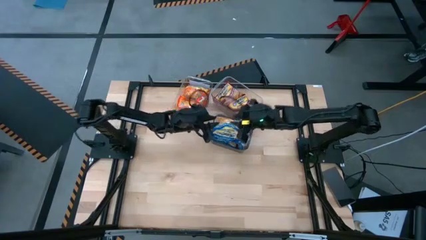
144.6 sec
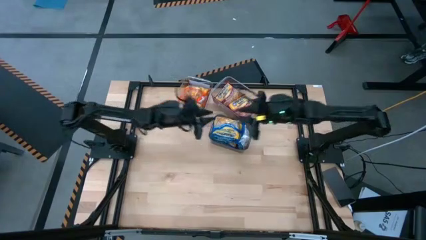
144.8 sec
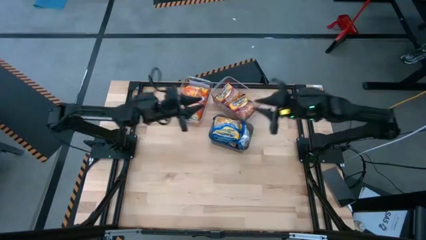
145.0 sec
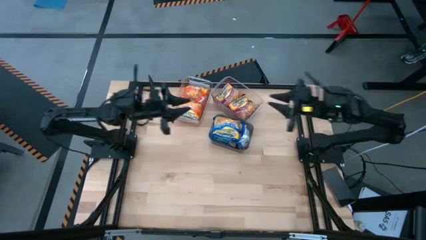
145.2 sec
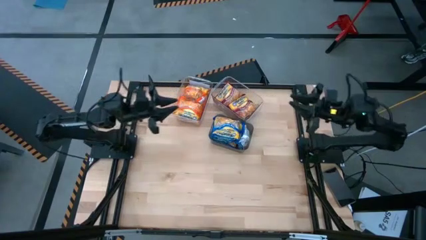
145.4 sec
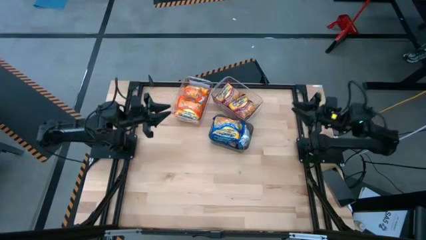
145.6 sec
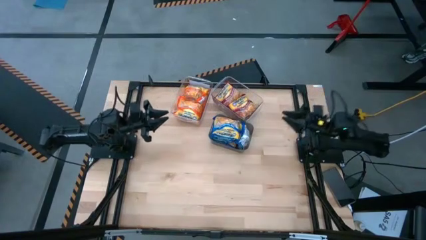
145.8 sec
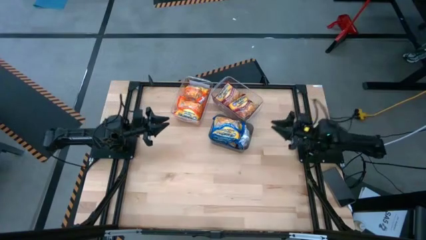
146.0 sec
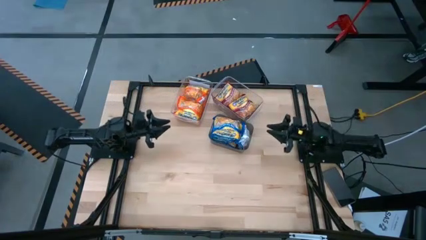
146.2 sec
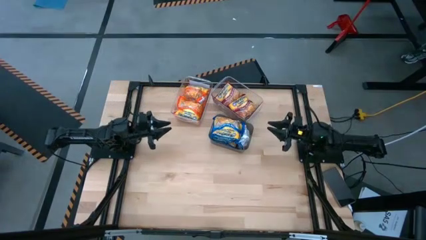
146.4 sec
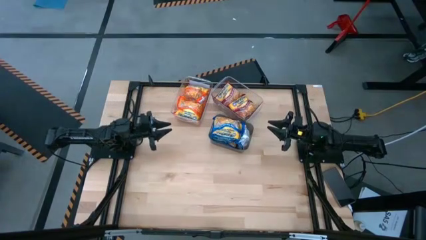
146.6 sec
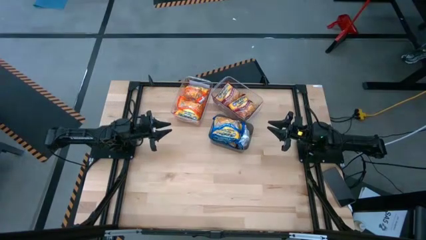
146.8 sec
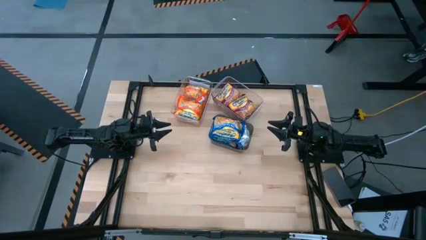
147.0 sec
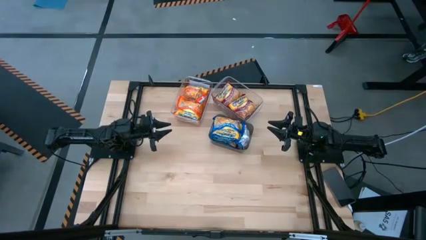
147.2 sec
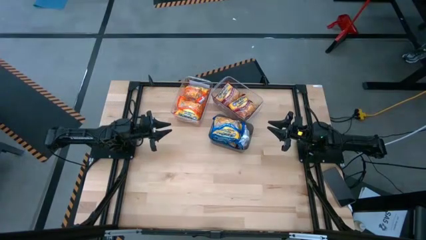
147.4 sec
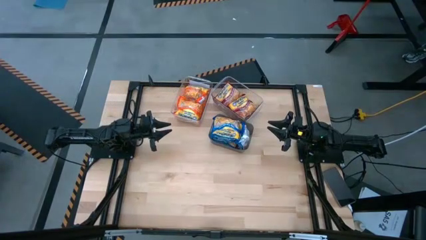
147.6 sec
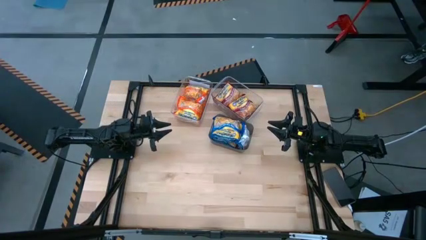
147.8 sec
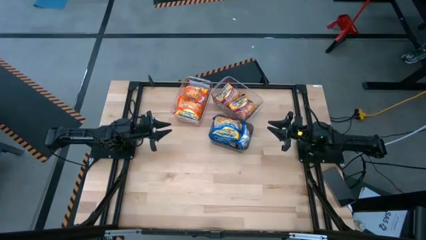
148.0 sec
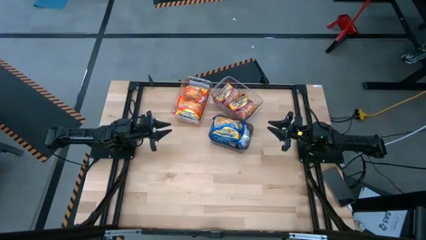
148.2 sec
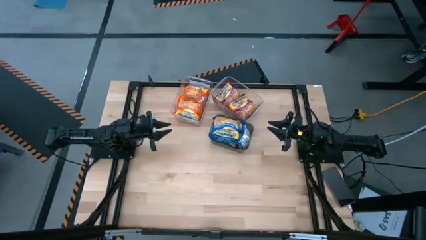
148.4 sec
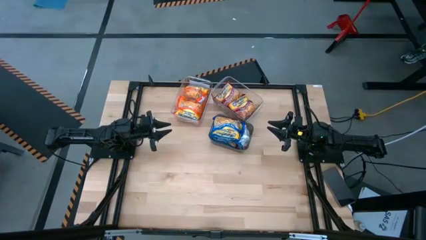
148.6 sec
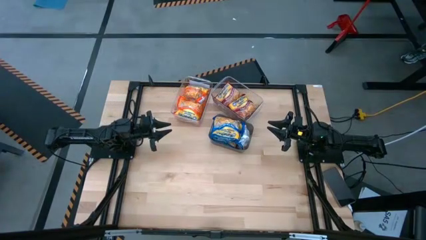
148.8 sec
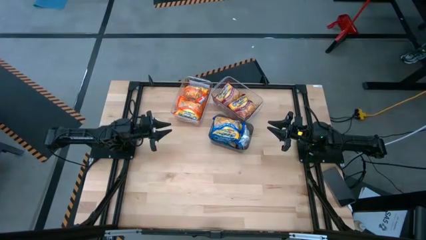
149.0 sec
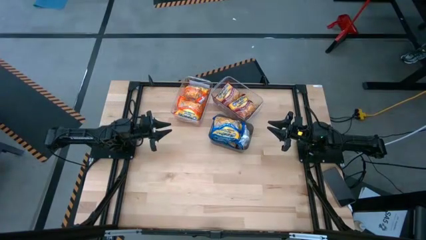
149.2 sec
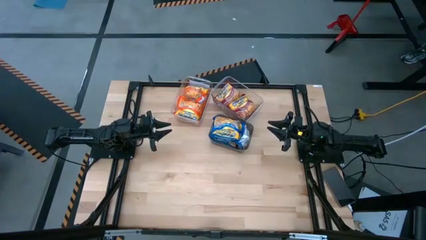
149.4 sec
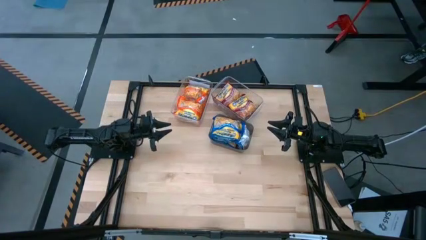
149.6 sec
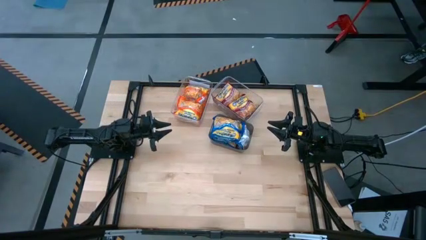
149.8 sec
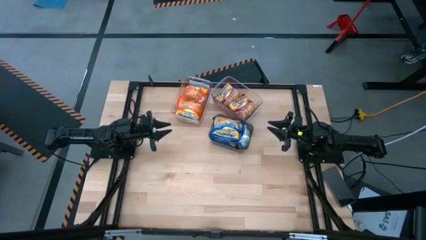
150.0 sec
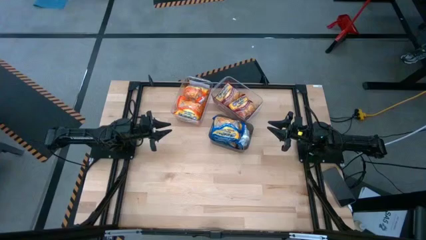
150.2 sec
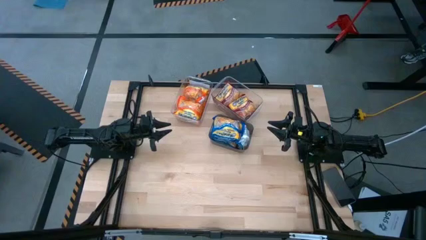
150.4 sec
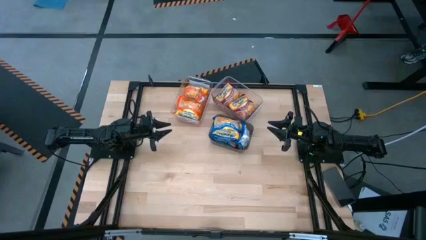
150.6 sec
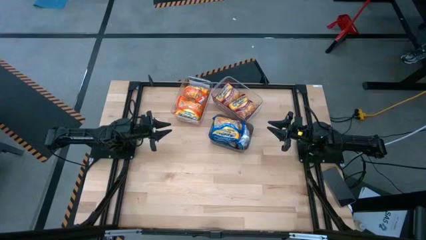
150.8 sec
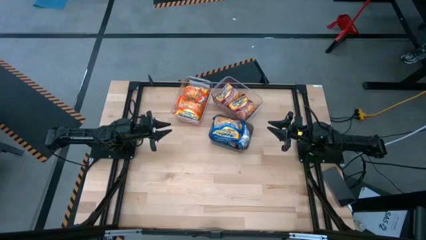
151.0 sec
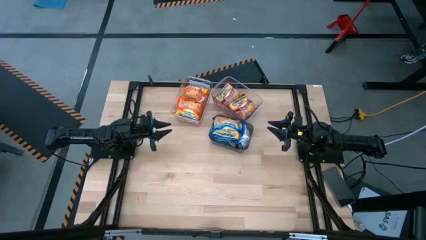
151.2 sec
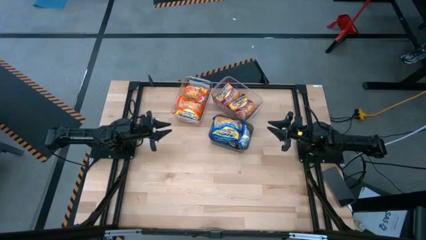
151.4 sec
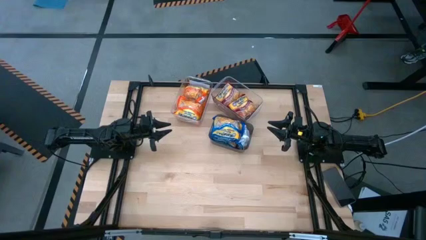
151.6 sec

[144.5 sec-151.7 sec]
Task: Sort Maruchan noodles
Return to Home Position

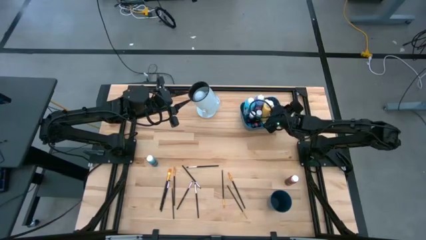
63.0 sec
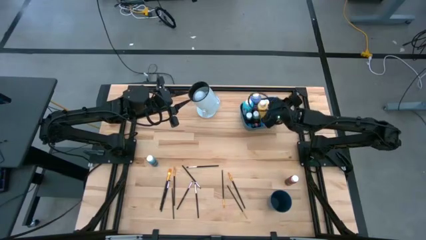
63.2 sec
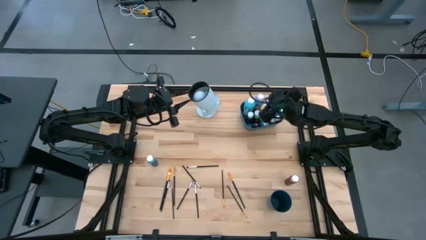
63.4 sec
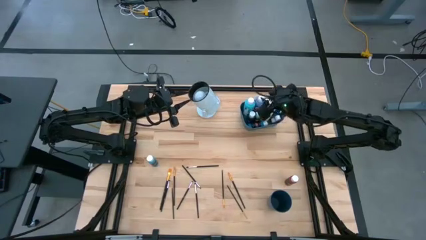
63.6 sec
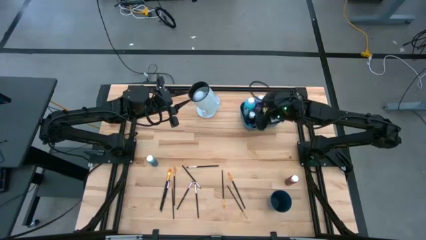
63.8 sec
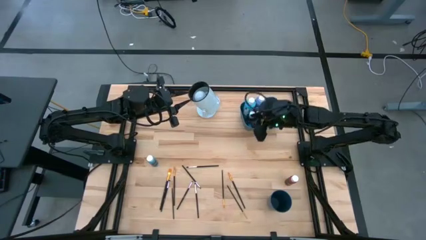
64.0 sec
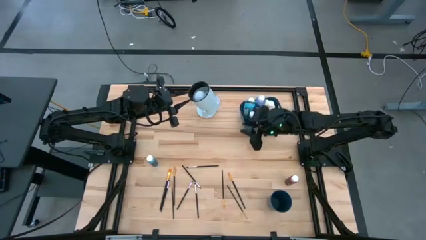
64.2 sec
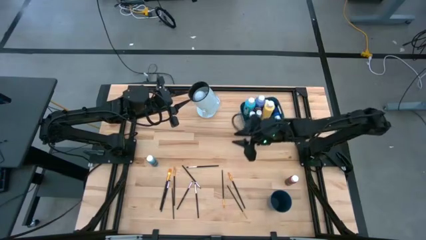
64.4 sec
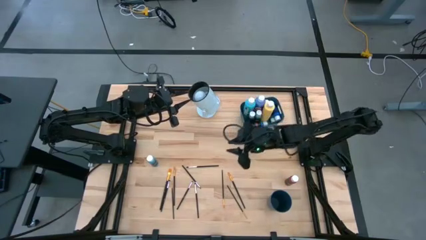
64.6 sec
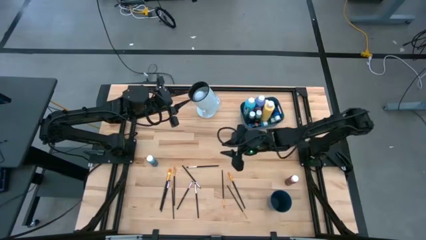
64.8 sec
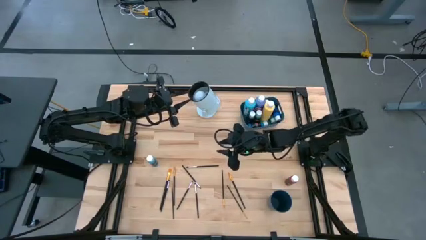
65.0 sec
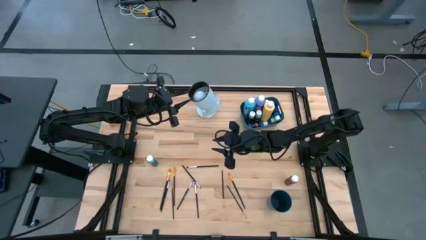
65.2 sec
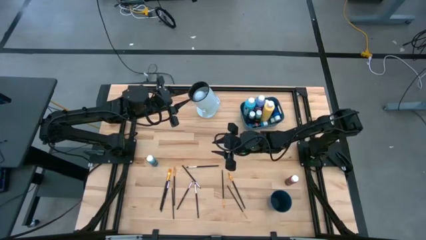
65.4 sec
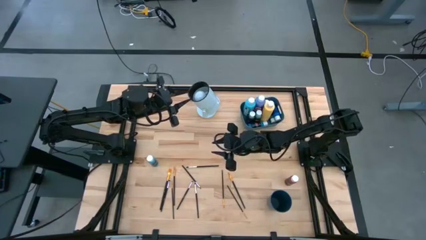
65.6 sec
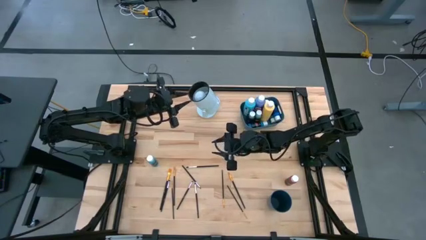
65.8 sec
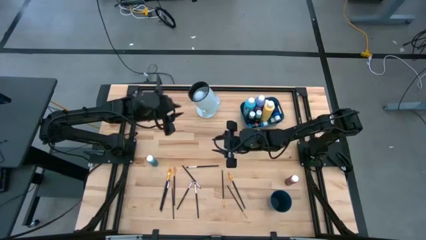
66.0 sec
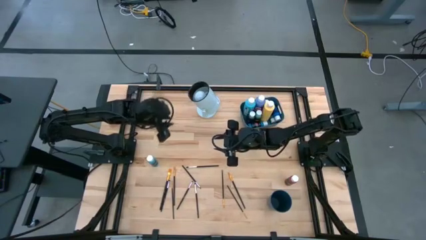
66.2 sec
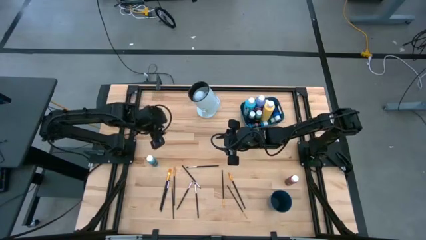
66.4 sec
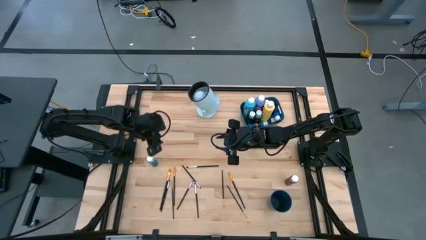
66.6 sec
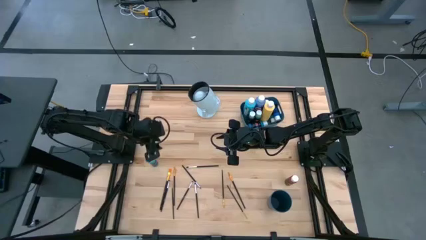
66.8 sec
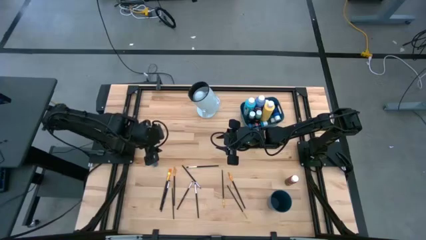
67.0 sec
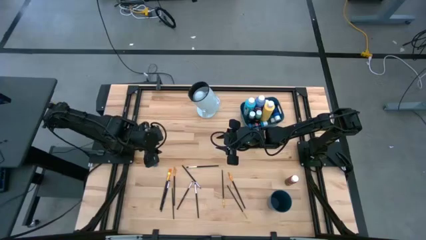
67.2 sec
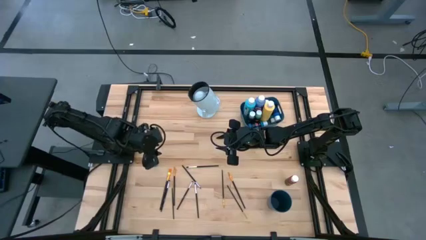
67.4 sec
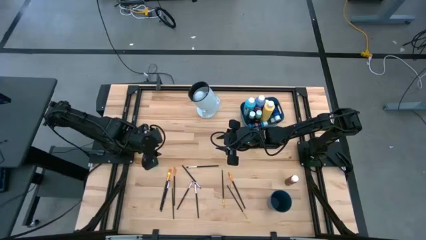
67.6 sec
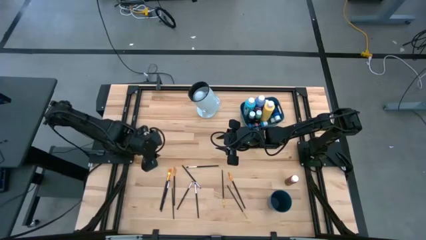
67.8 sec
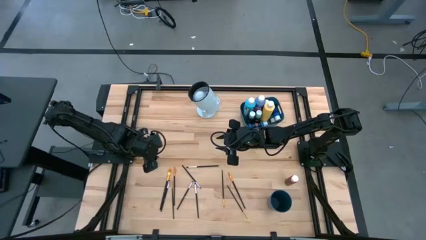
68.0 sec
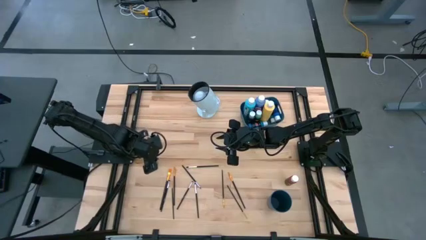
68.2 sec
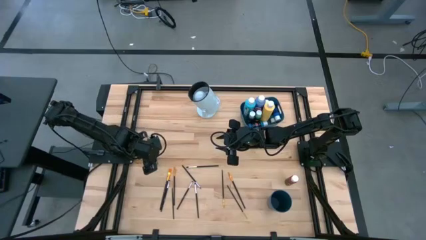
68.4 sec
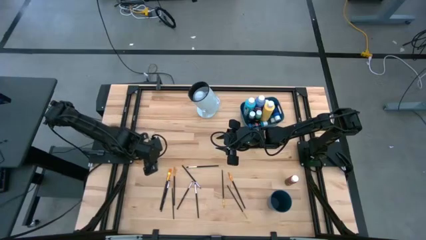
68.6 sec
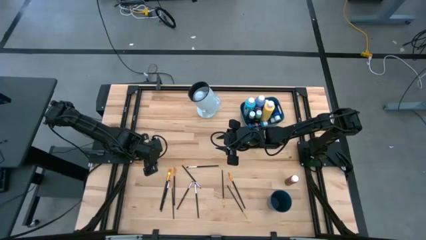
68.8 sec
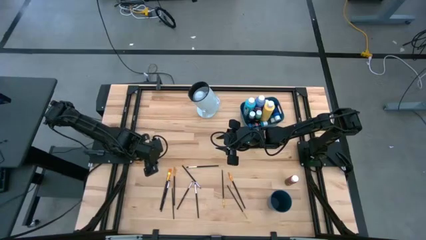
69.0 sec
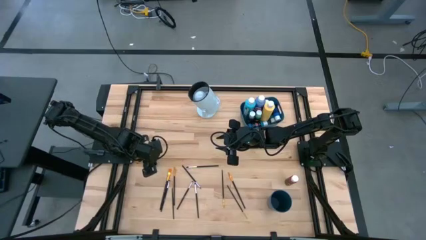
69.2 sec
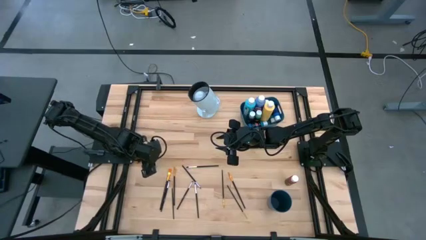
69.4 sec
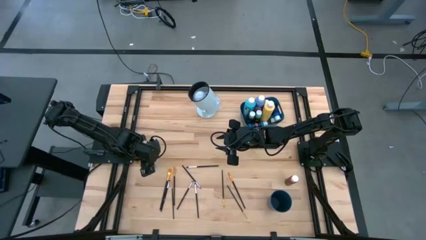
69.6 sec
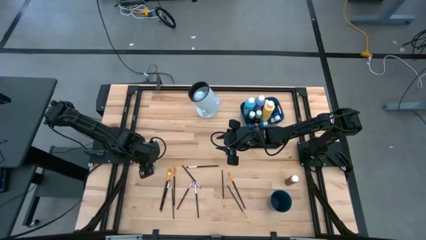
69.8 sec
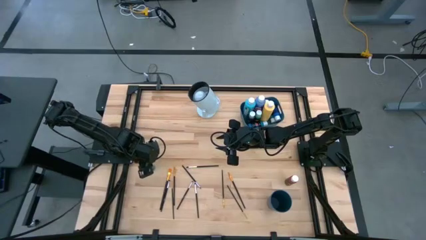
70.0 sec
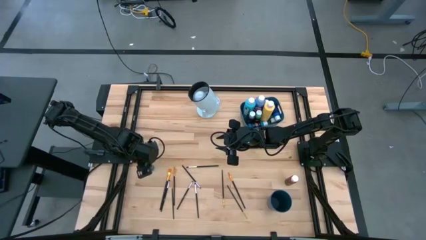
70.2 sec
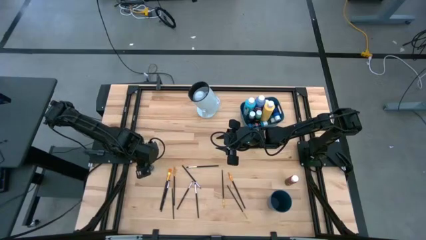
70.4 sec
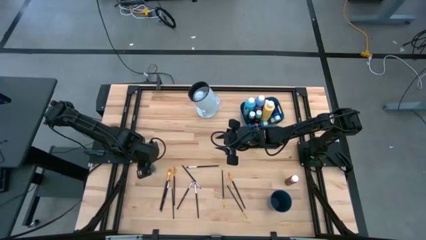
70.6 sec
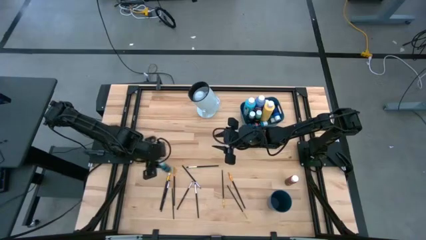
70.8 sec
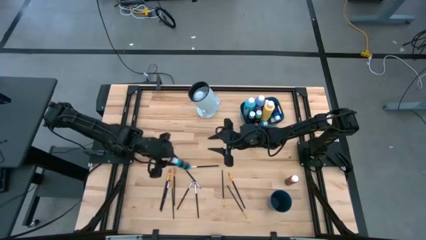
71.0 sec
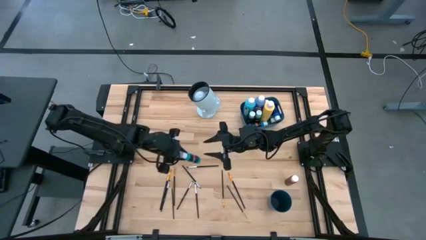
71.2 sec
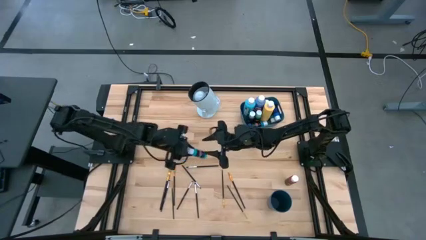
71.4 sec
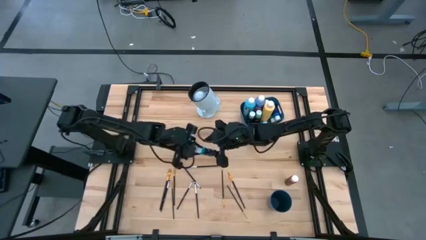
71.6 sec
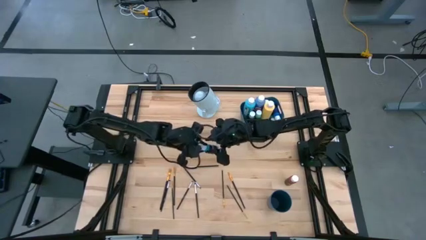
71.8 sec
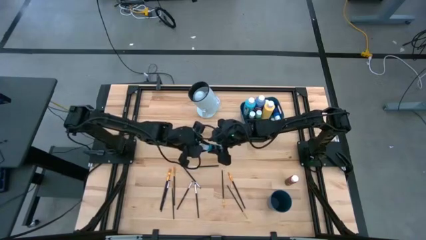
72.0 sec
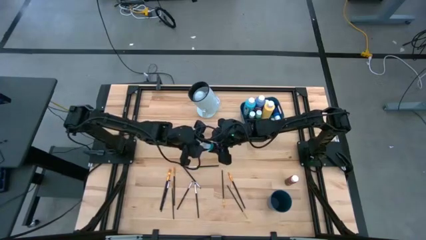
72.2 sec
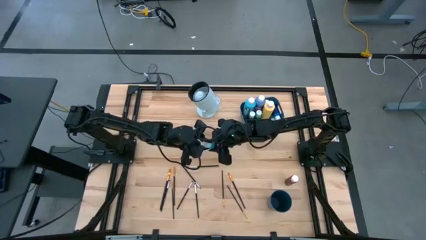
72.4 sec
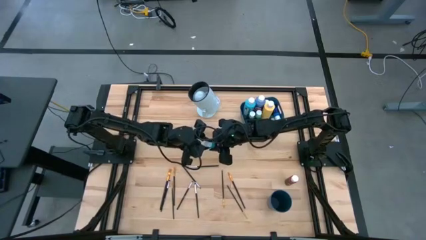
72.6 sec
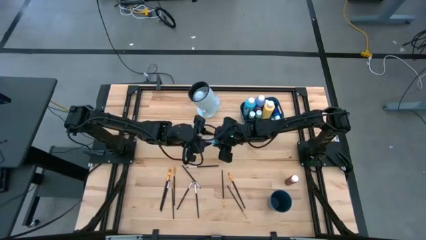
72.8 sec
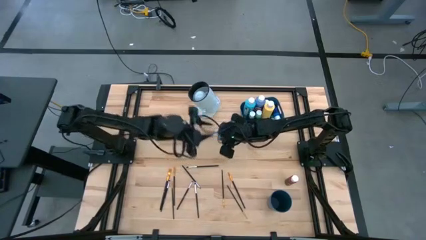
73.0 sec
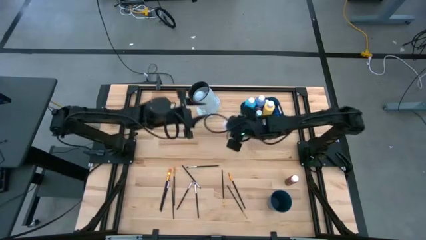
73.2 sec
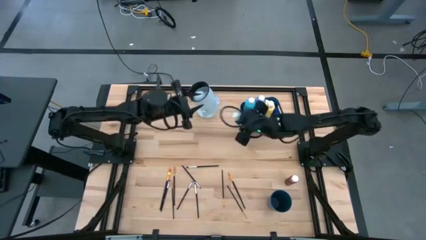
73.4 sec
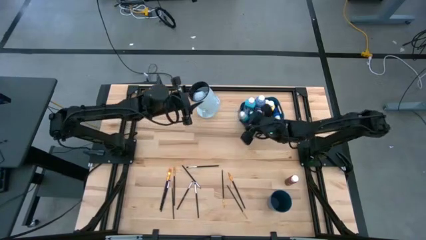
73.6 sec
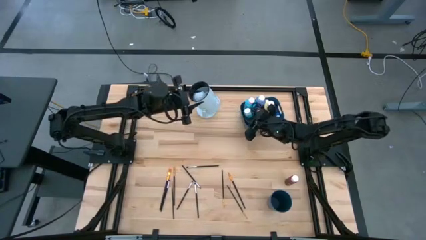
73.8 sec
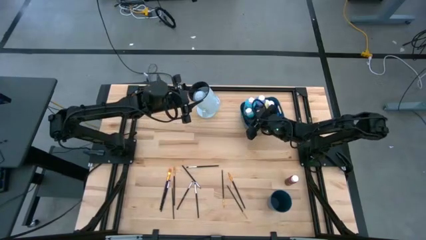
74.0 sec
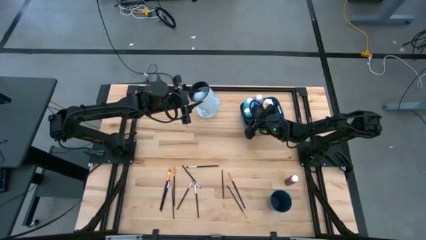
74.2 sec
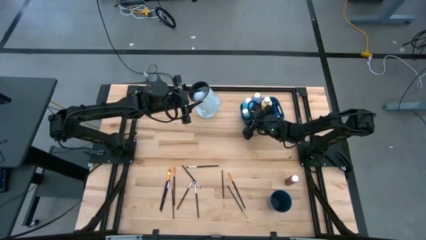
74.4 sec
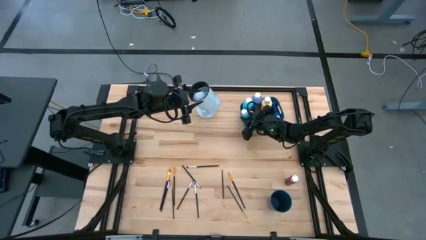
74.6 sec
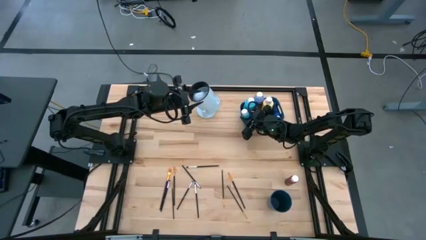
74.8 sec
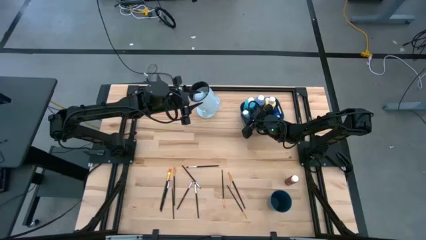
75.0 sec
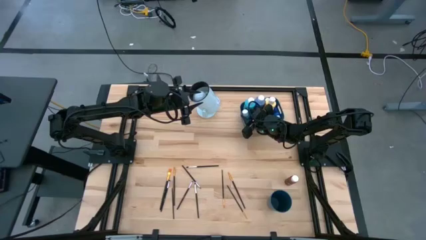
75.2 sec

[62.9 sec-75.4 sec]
Task: Pick & Place Paint Supplies
Put the small light blue paint bottle into the bin
